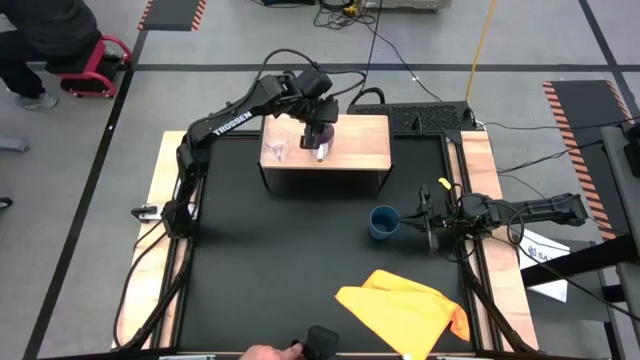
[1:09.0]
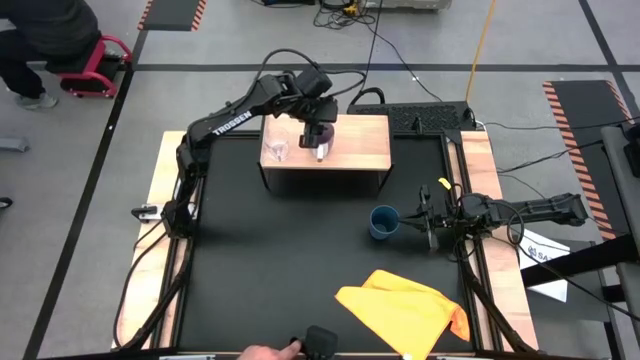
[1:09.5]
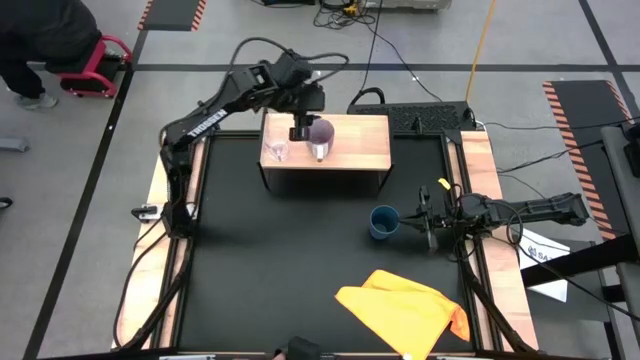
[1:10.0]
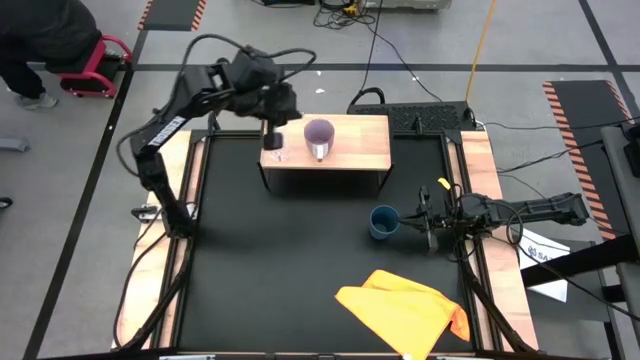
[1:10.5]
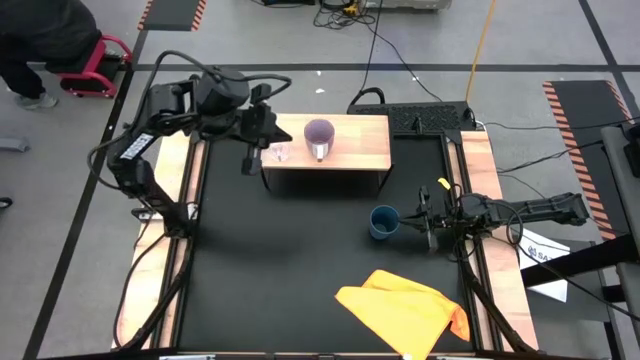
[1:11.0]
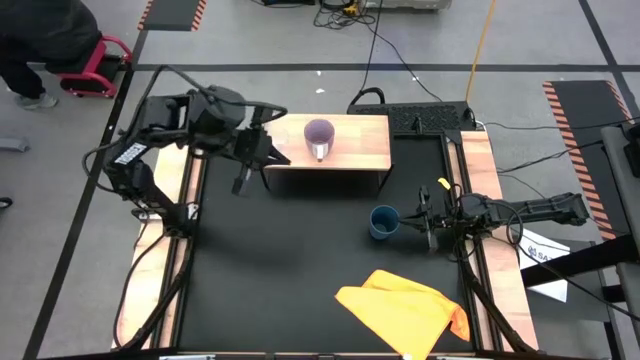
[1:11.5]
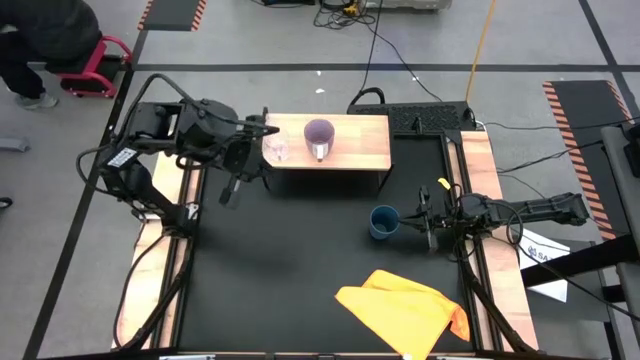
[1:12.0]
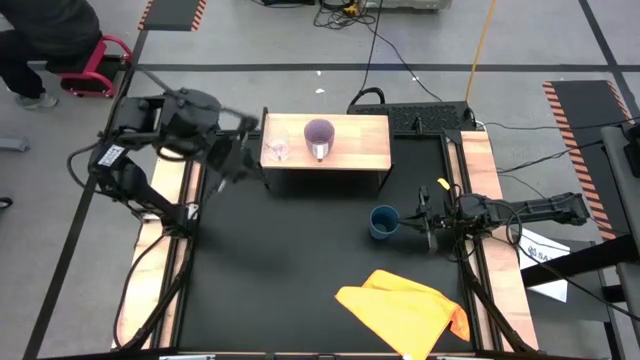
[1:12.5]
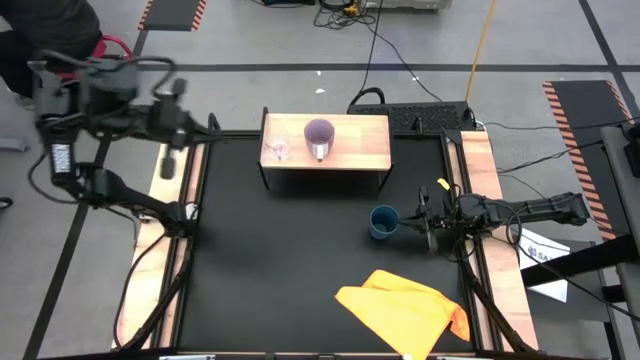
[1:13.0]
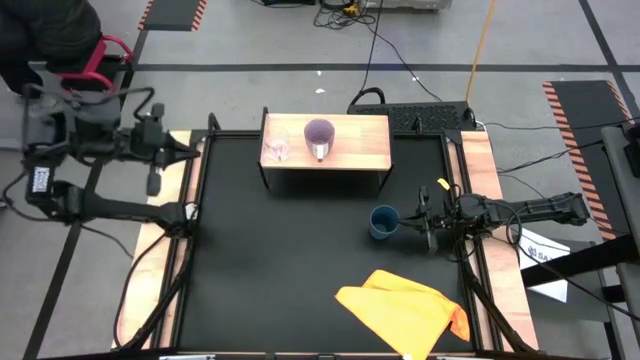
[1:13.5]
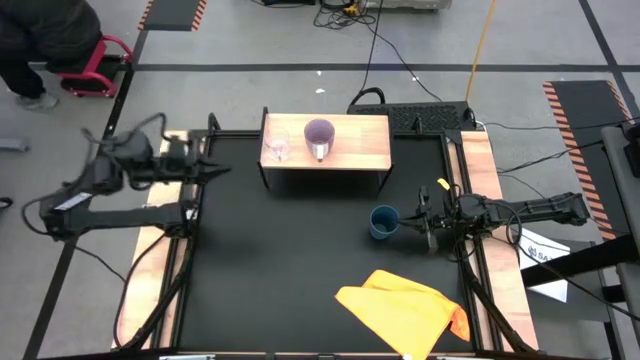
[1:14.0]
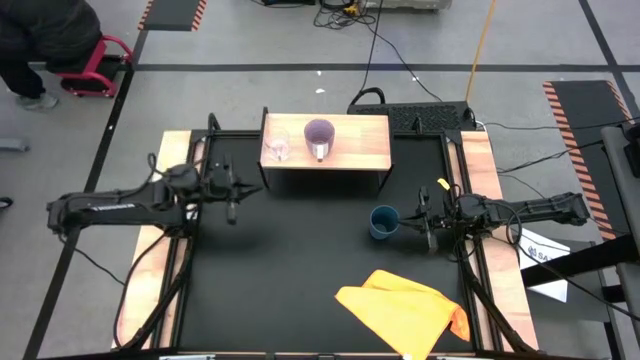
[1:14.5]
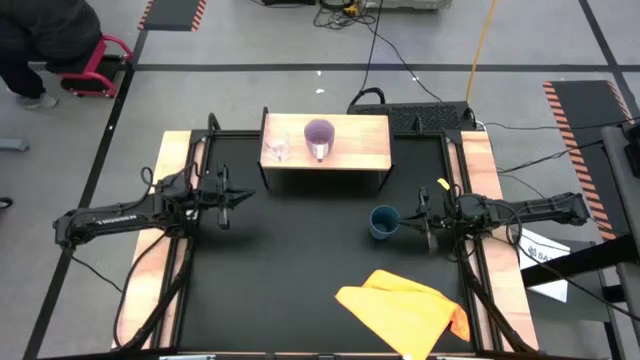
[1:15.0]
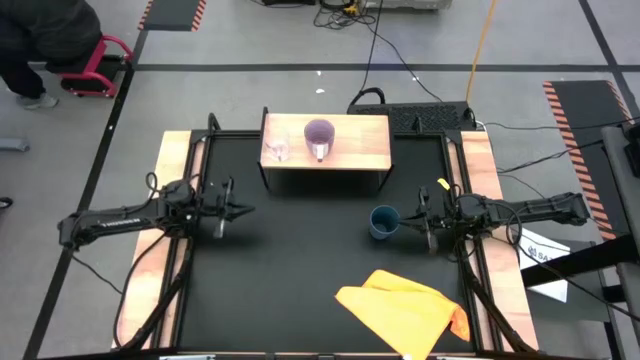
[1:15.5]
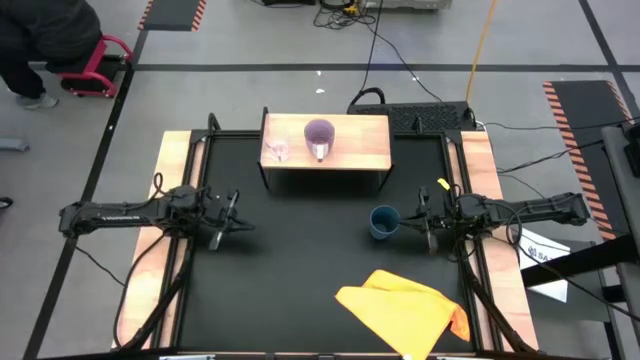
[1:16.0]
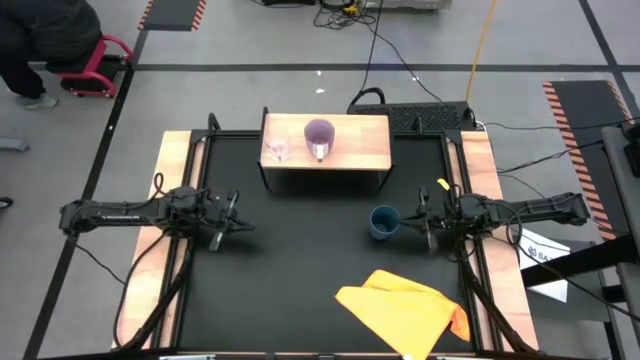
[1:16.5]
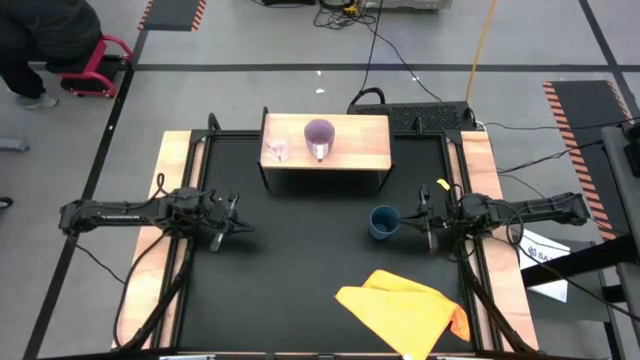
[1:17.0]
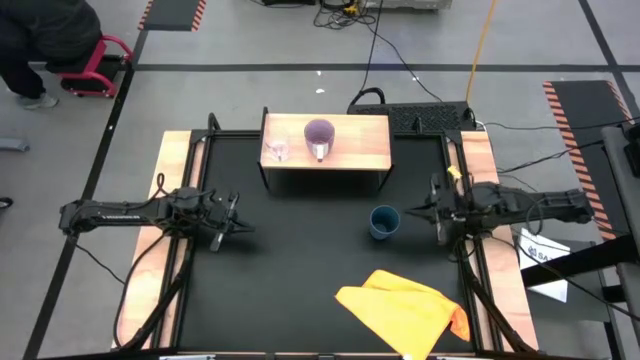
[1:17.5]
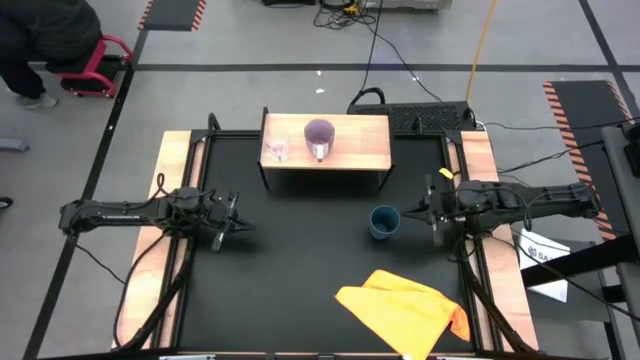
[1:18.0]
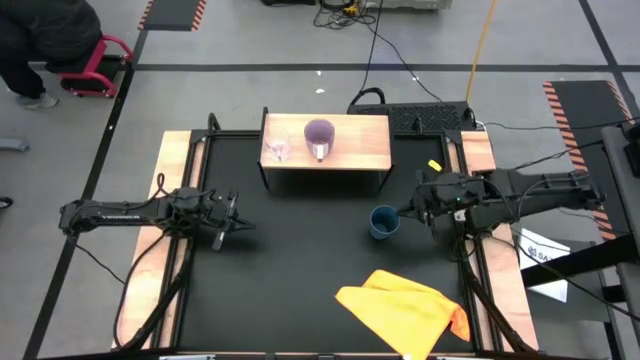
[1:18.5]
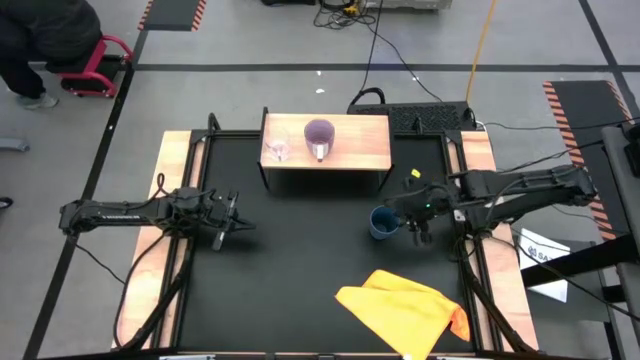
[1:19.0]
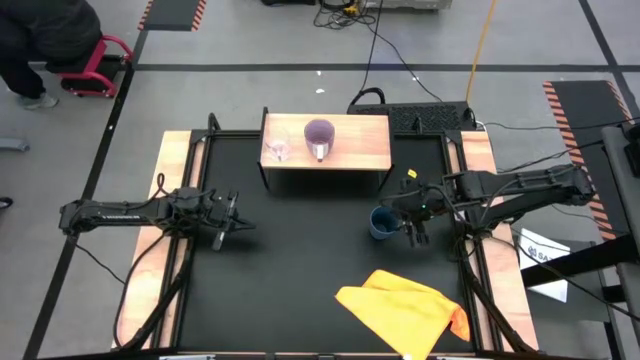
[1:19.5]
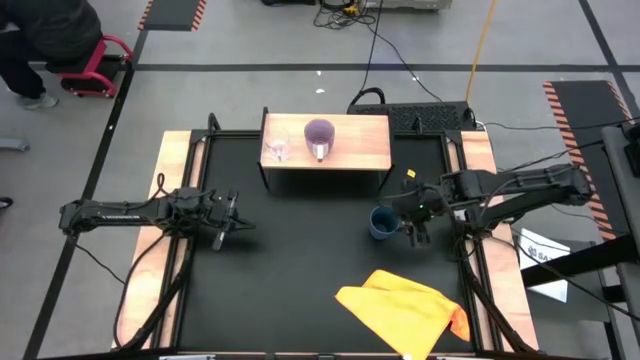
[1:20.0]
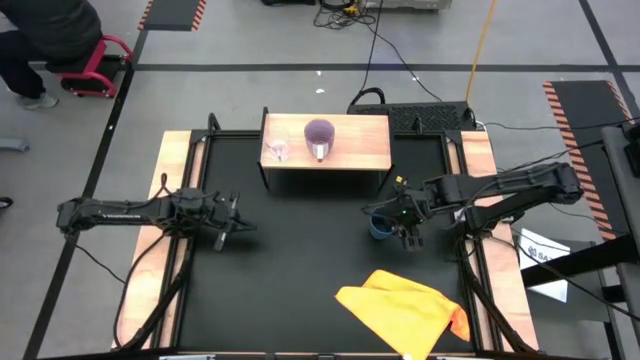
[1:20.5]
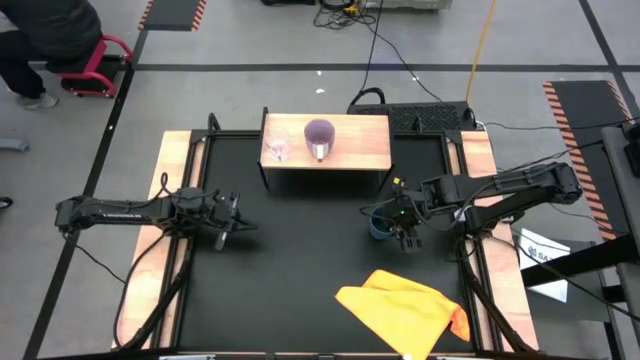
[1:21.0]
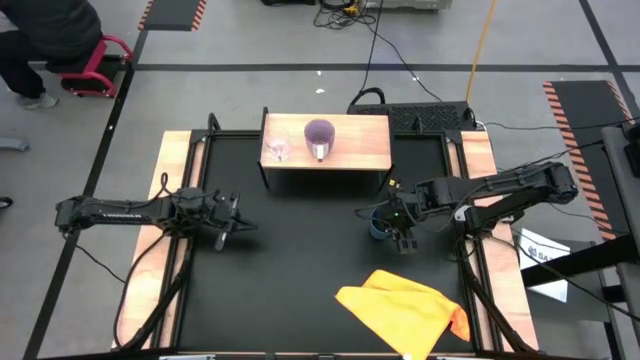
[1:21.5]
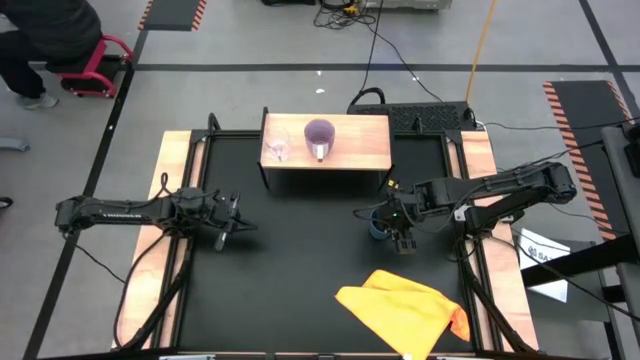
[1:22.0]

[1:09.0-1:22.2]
Task: Stack small to large cups/mugs on shelf
Put the dark blue cup on the shelf

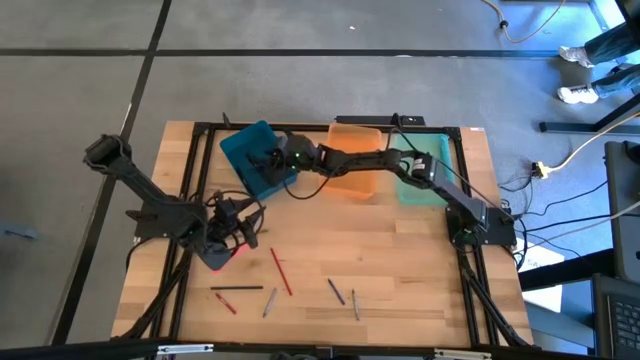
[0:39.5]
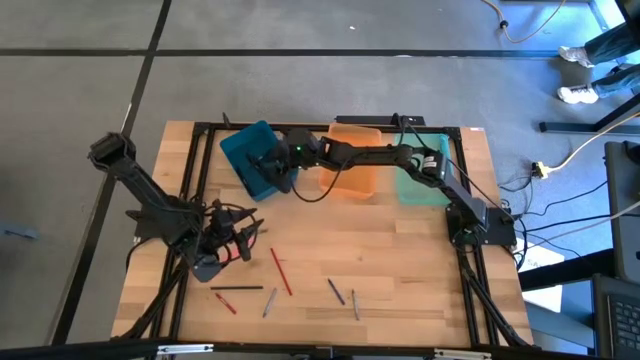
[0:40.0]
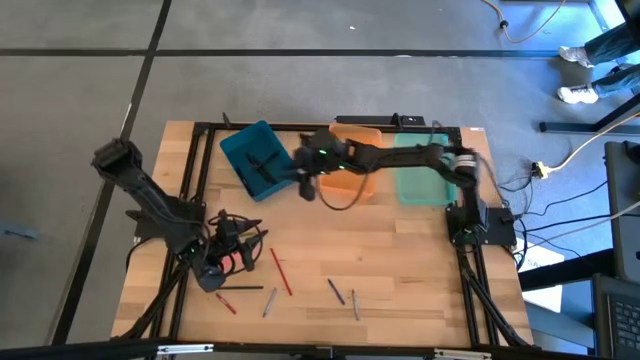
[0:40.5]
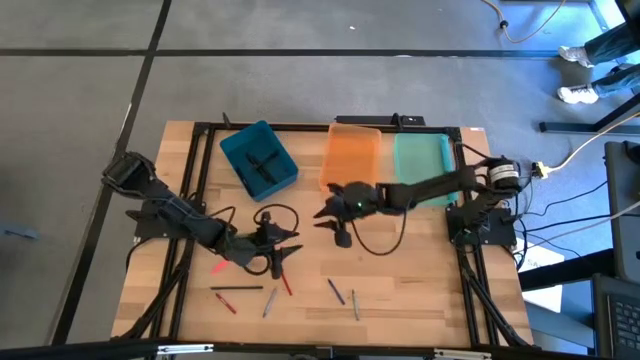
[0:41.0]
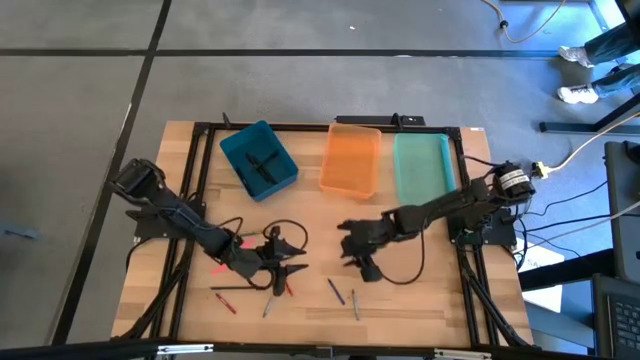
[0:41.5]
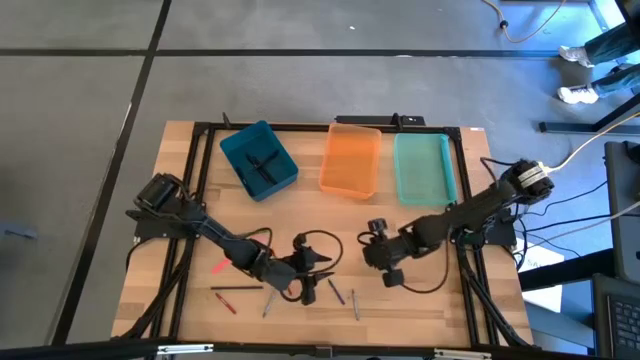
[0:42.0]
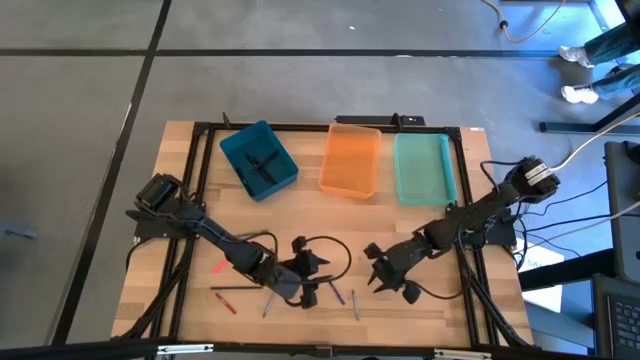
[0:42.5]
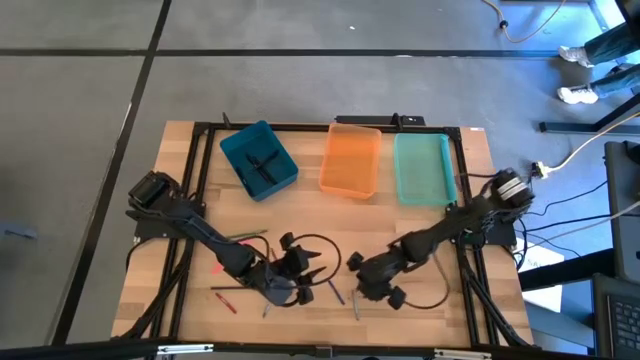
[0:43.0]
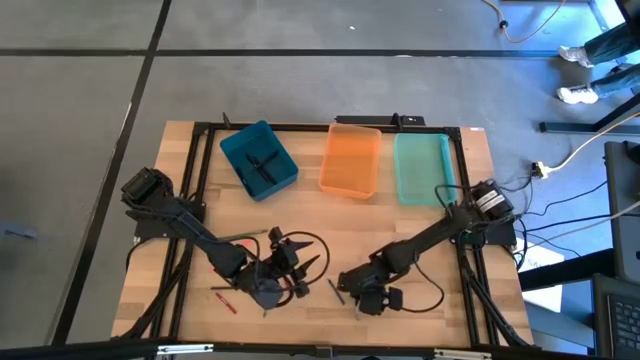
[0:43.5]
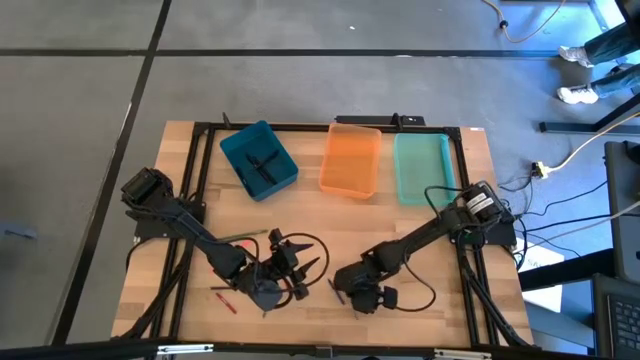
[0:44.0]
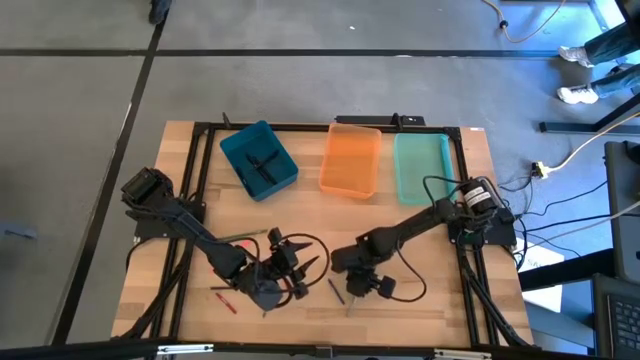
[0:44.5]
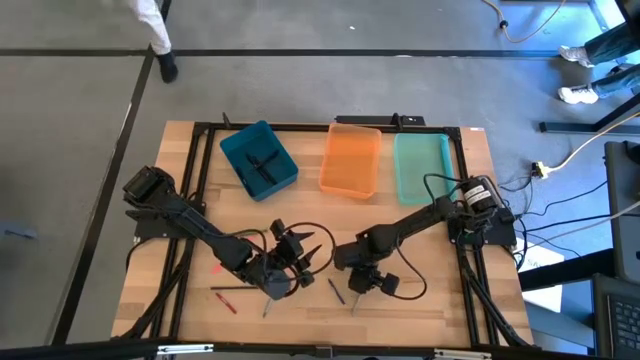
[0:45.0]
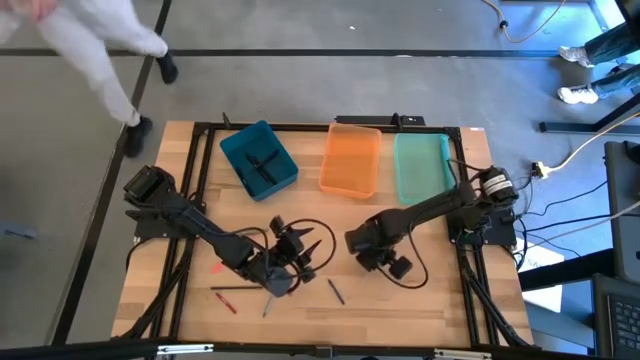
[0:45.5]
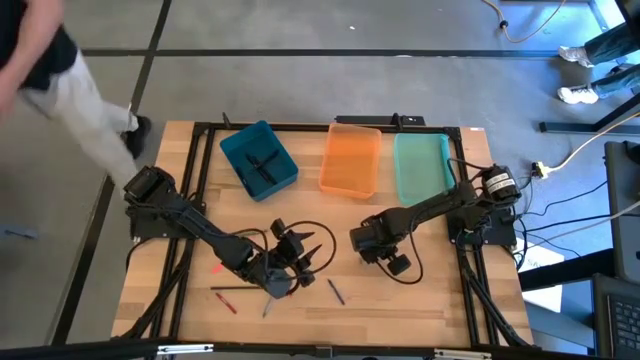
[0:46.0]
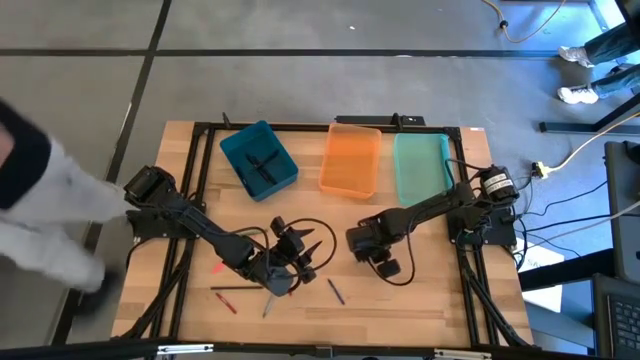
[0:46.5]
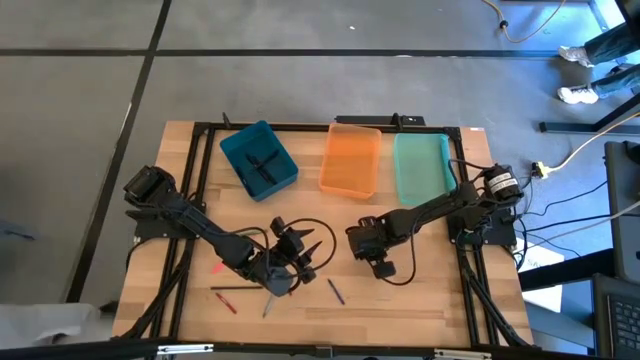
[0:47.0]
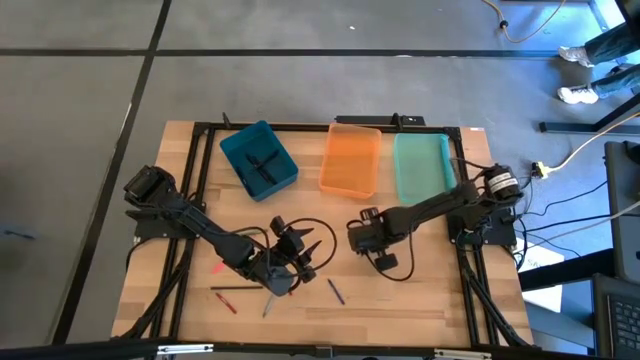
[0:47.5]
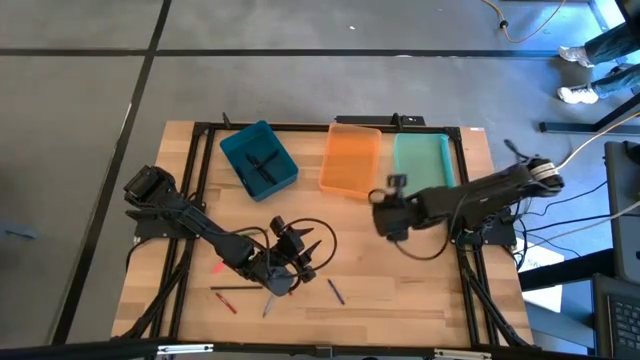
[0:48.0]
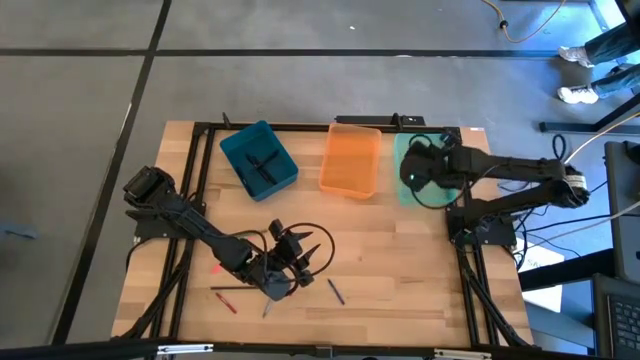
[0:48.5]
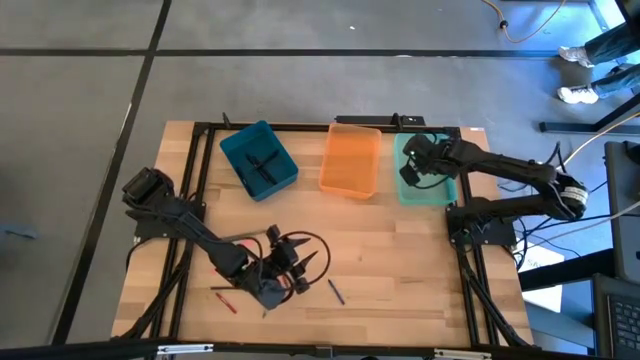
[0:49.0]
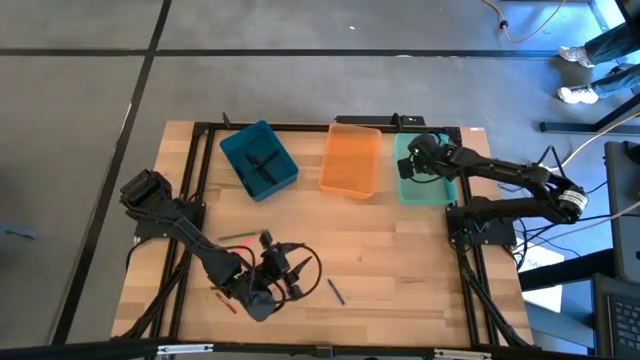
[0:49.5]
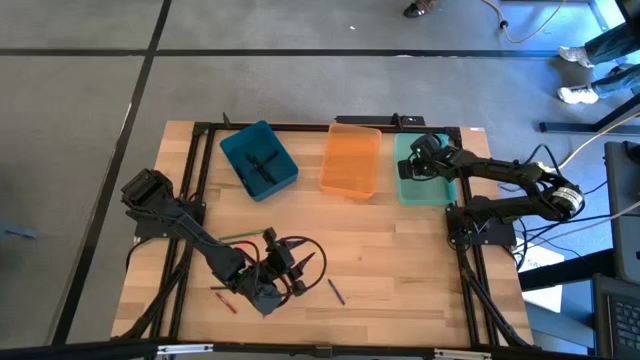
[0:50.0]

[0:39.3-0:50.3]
Task: Sort crayons/erasers/pens/pencils in bins
Put the right gray crayon into the light blue bin
